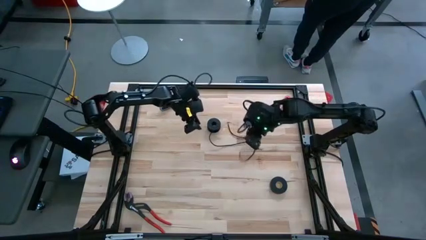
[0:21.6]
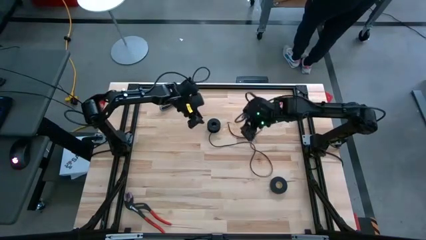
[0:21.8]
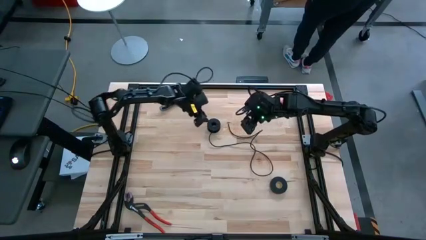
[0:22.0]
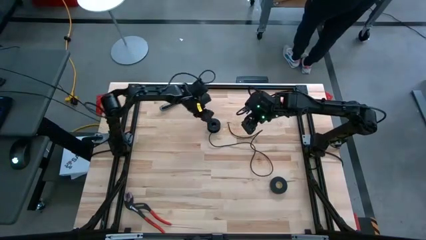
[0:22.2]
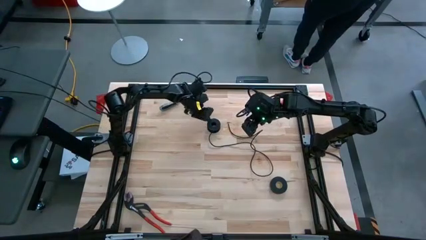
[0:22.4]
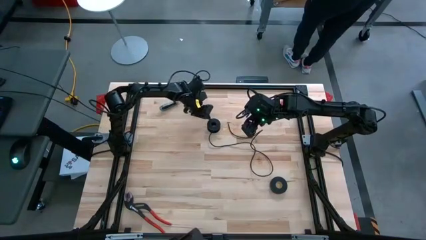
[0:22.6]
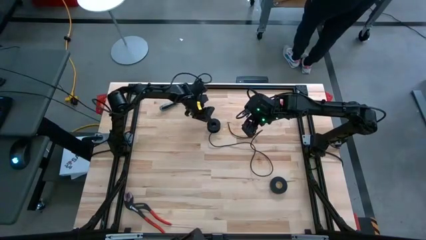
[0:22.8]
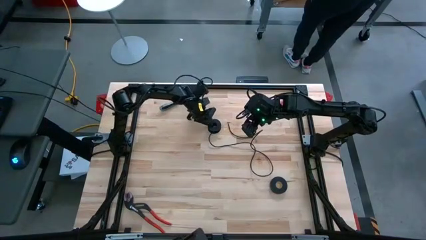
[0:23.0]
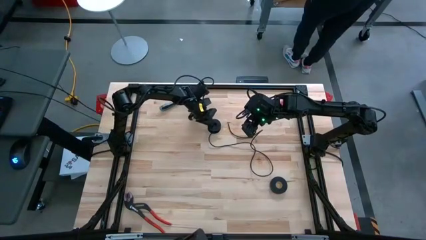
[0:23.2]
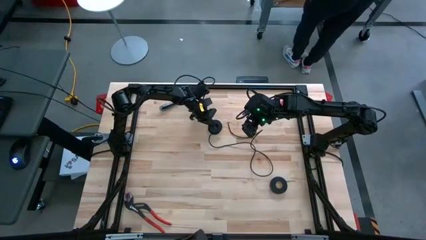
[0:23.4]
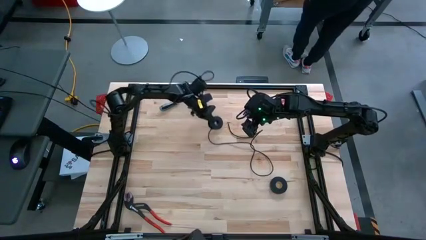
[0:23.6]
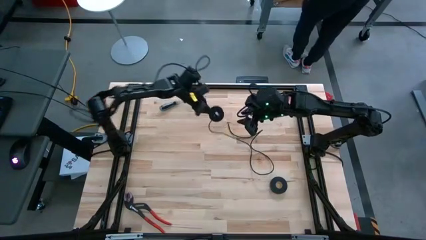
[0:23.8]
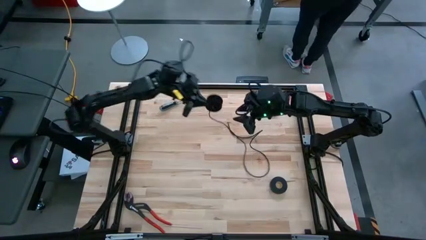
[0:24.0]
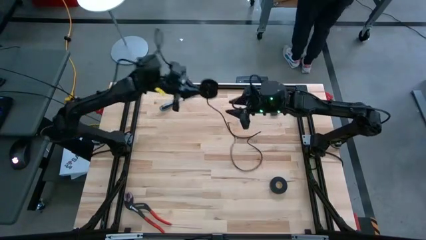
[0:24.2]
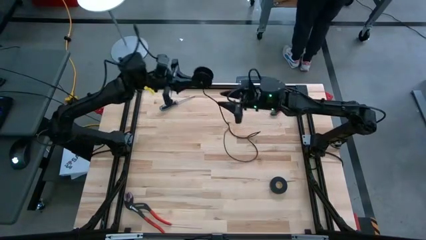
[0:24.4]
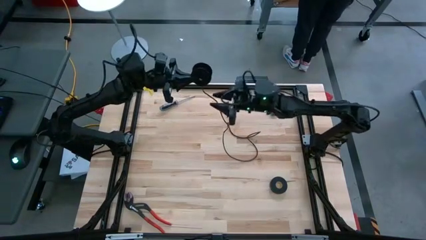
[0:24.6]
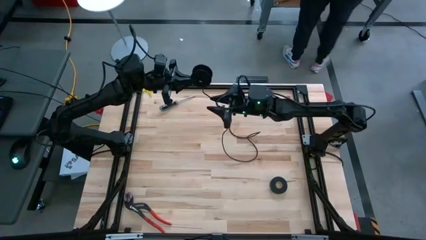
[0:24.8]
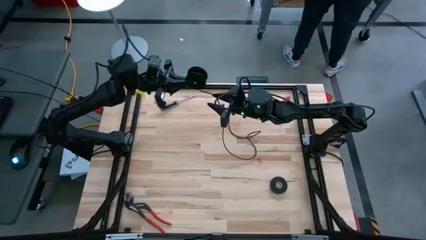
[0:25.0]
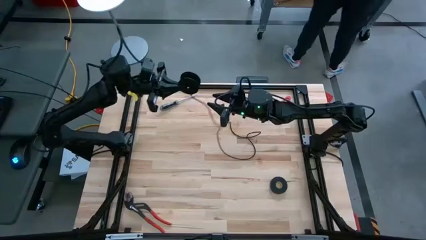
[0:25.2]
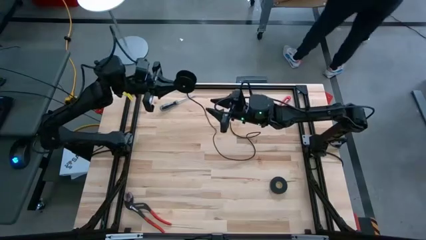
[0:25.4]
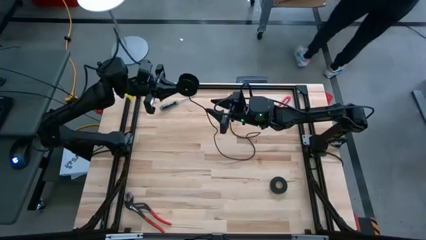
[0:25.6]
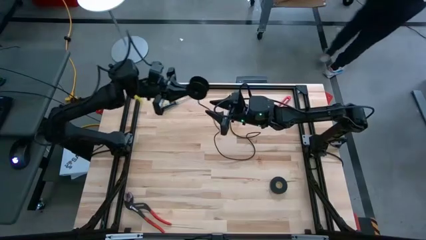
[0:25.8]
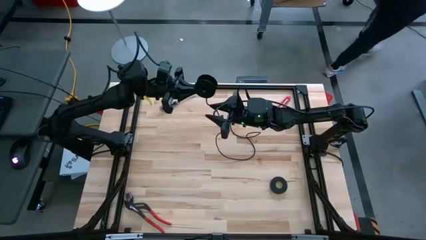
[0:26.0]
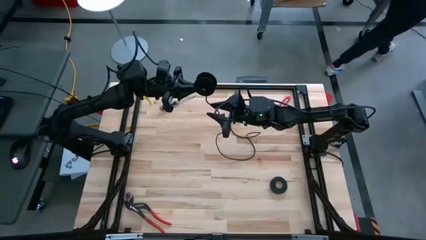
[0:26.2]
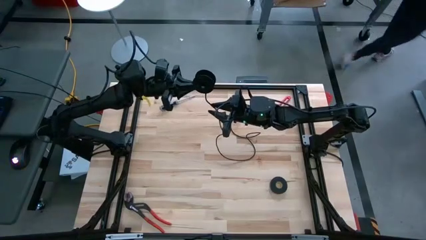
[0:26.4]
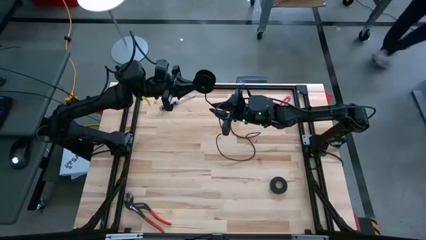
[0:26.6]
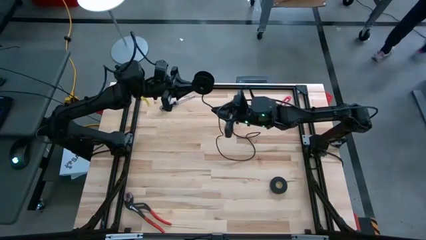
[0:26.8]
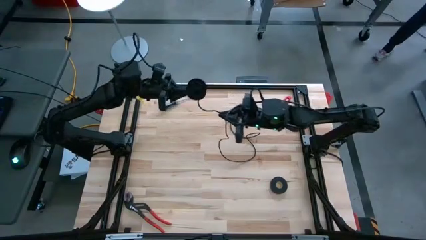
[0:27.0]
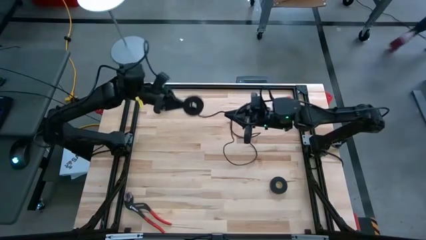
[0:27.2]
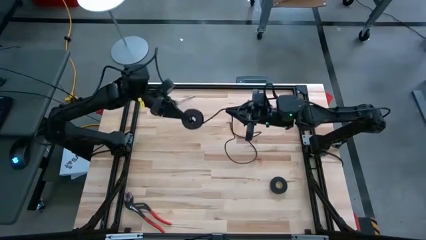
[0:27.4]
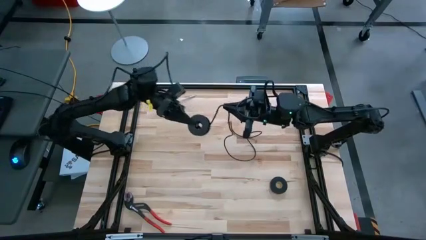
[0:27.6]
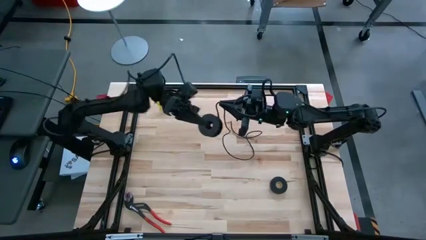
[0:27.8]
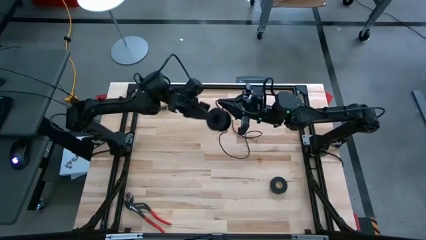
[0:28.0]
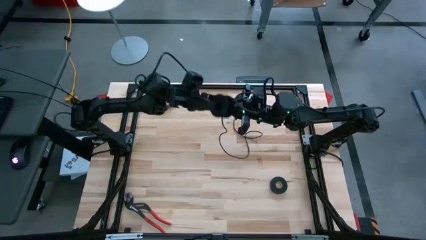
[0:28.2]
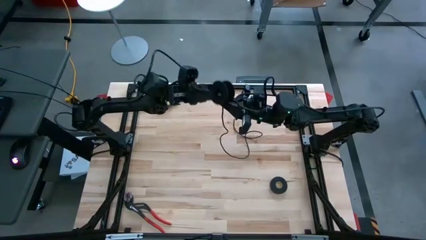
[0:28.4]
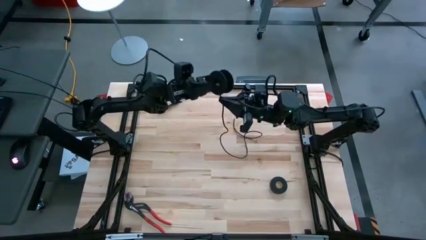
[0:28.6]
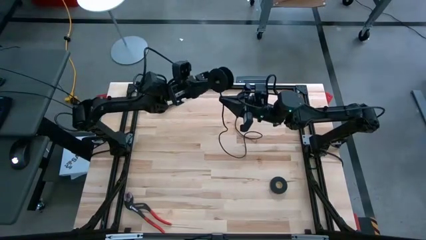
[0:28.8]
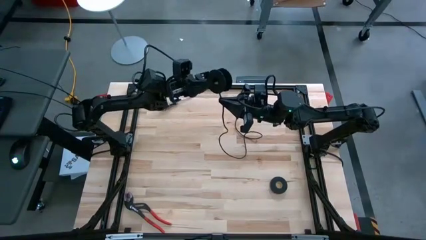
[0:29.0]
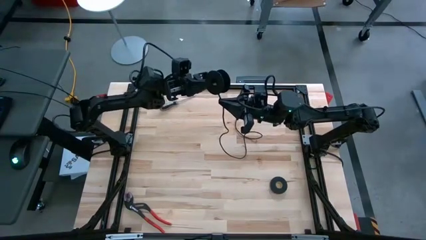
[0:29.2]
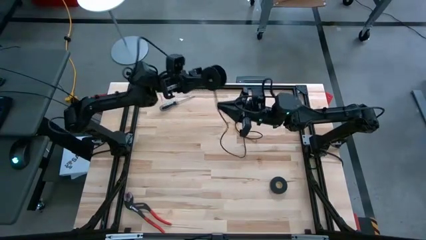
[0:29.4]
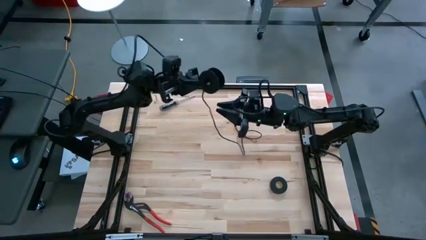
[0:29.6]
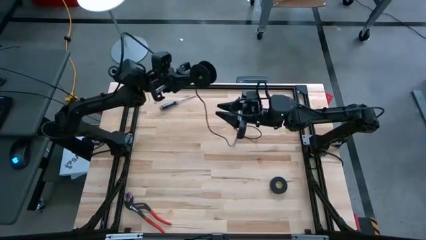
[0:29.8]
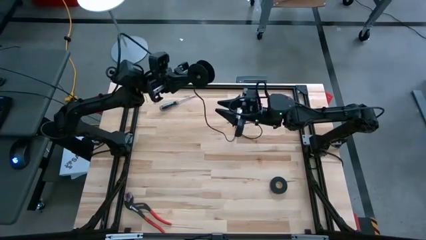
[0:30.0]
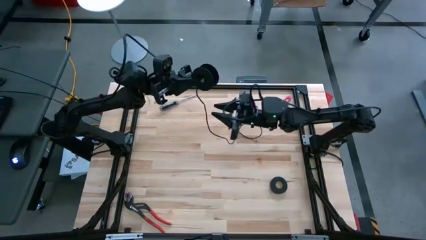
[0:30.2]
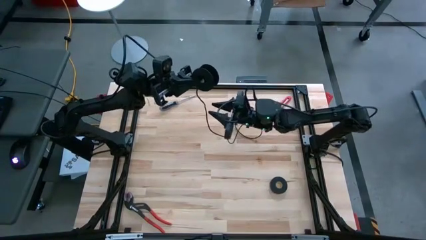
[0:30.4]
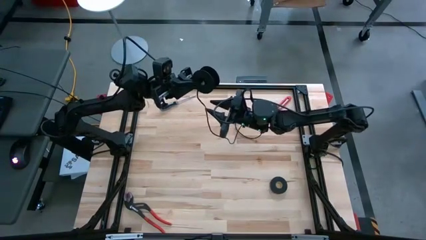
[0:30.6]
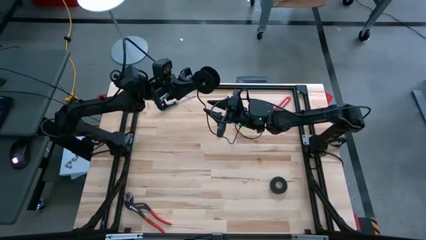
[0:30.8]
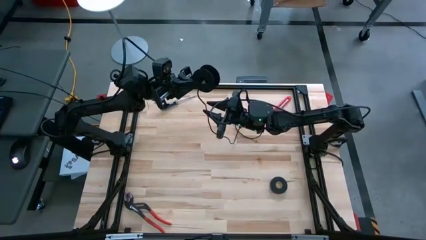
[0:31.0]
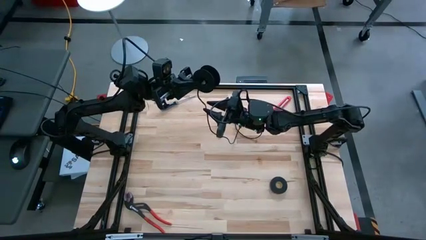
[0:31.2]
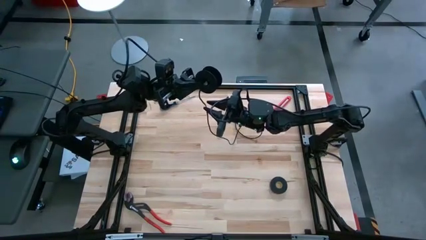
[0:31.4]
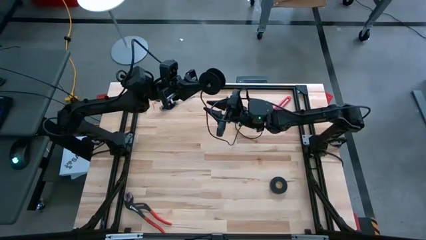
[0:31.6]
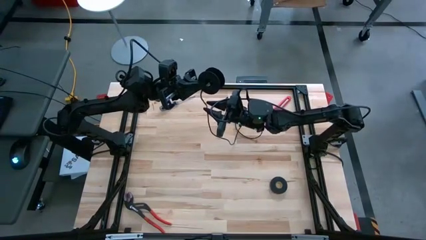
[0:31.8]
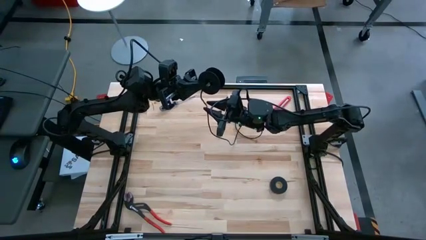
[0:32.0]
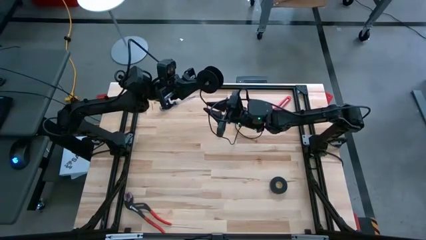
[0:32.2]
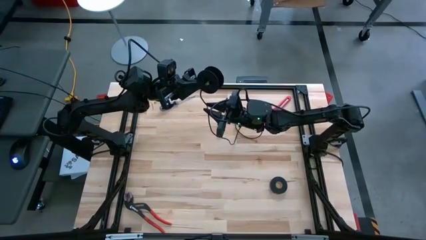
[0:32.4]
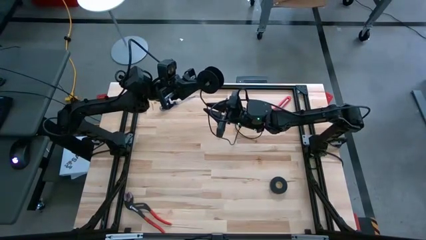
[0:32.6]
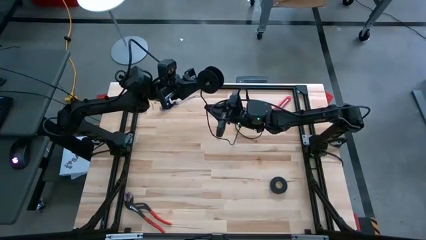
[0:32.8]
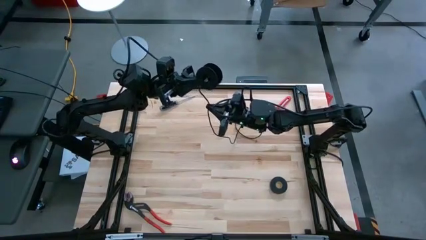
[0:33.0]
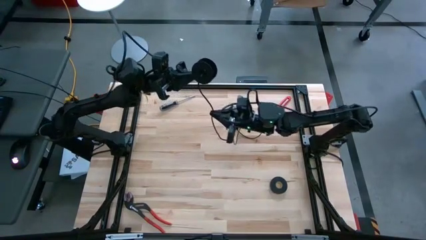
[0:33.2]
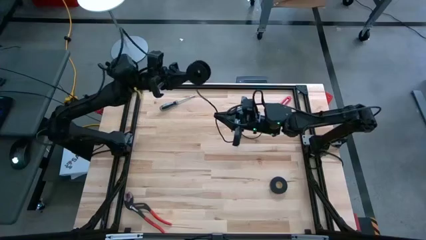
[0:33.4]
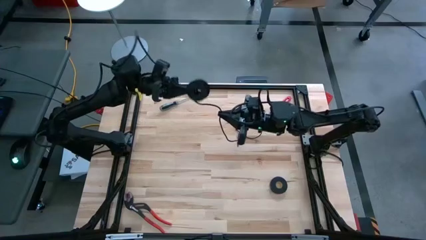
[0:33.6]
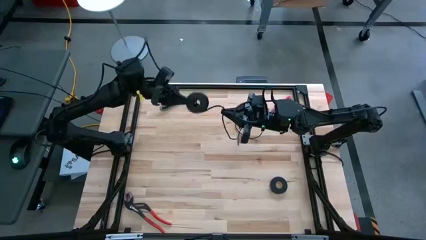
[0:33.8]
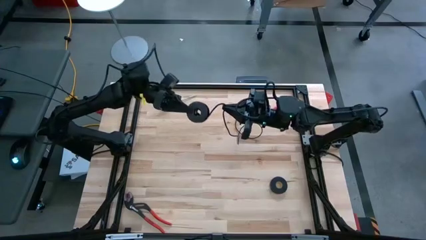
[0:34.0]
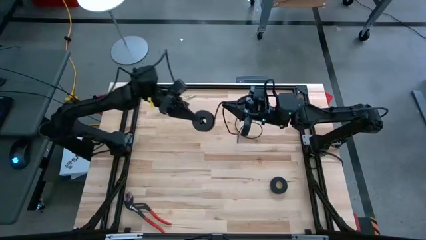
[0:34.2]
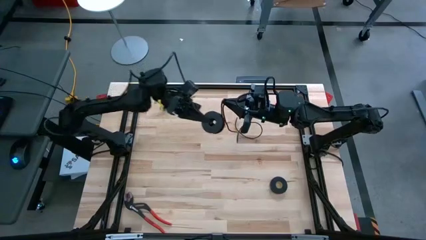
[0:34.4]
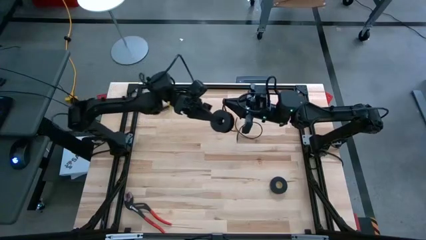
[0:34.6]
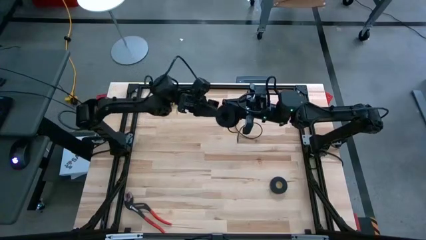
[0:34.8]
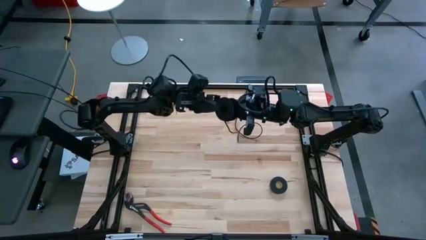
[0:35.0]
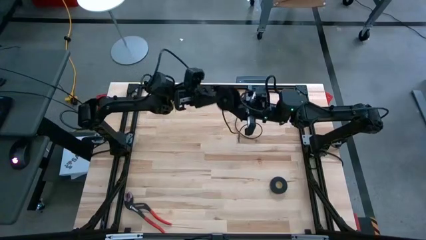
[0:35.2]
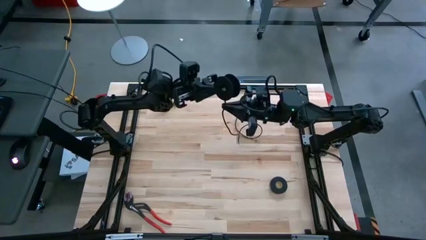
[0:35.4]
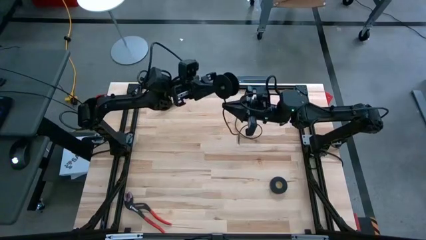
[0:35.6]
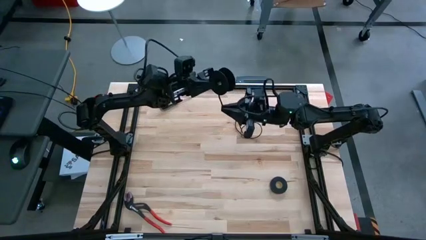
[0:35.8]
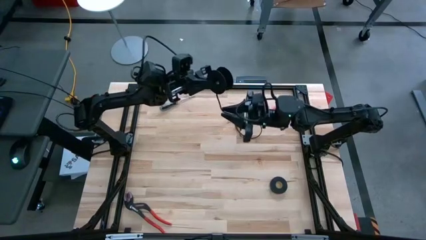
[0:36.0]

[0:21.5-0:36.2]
Task: Coil cords
Coil the black wire on the black spool
